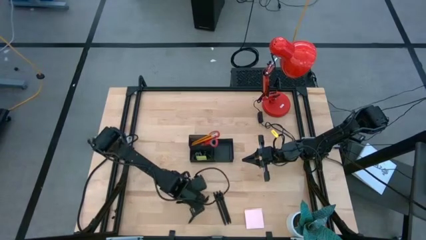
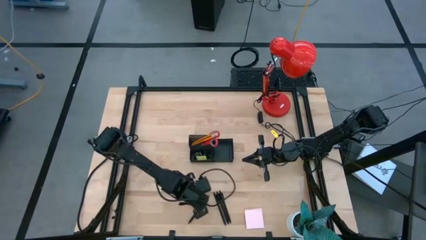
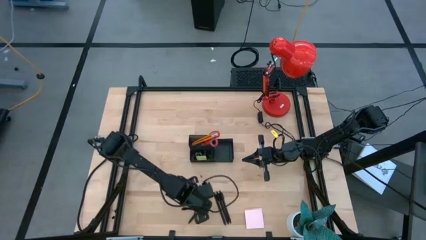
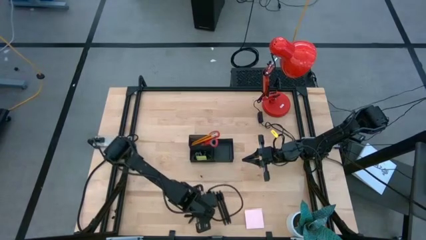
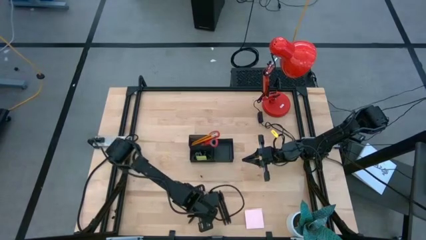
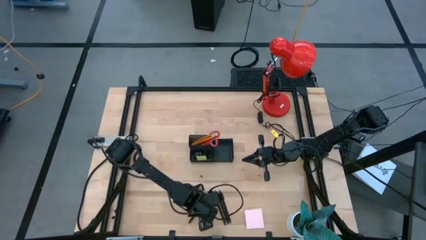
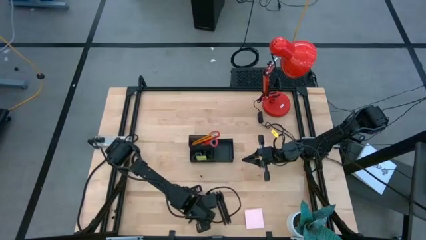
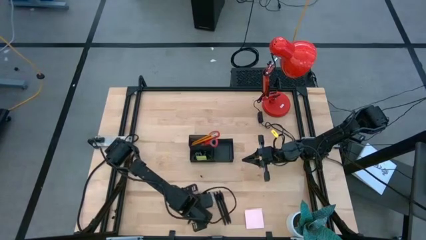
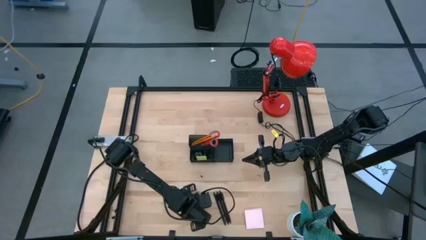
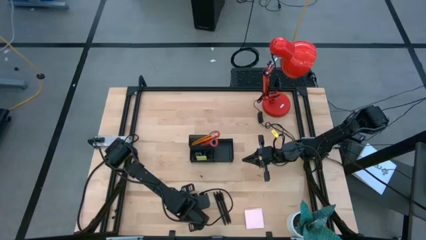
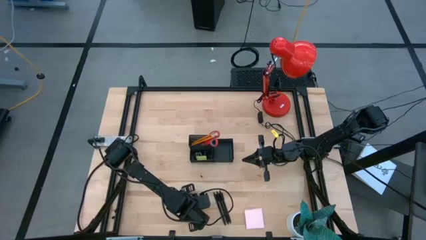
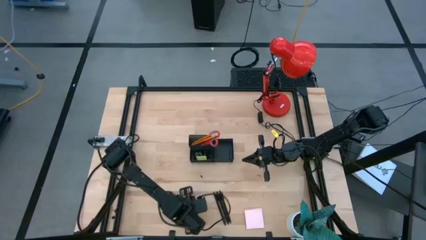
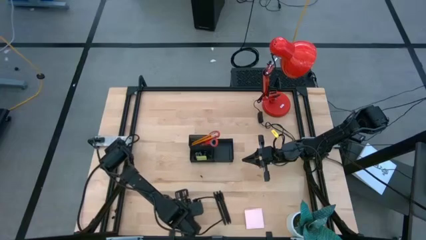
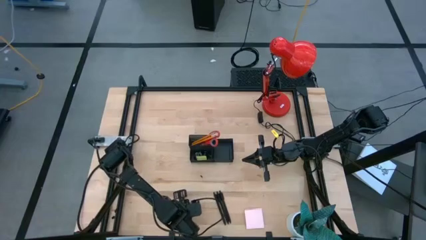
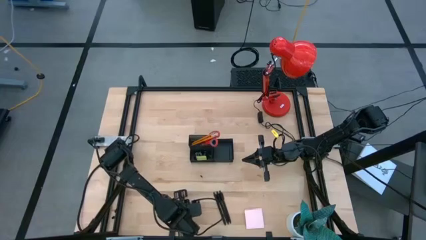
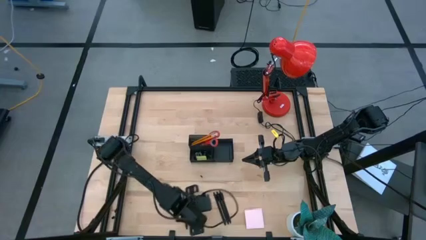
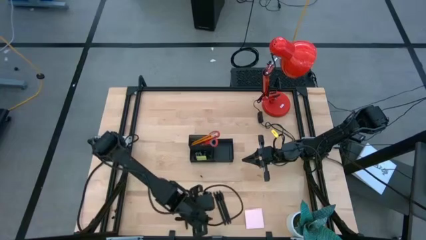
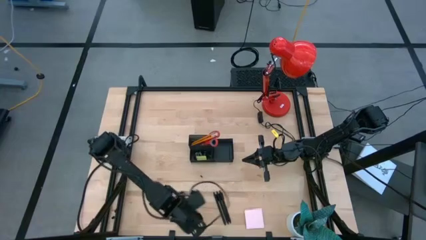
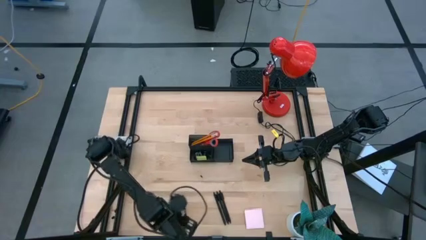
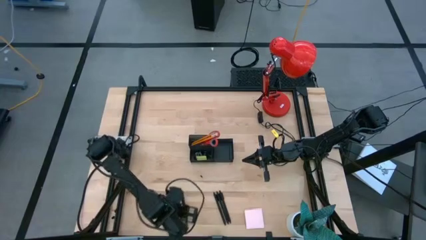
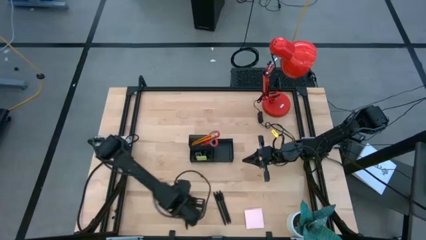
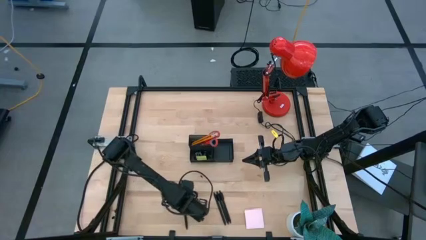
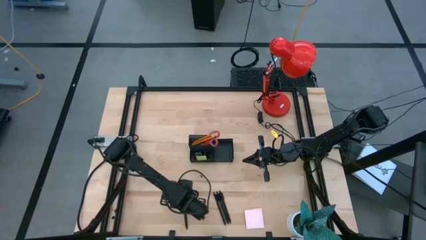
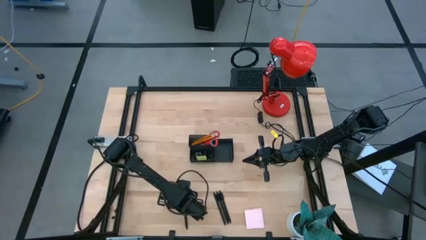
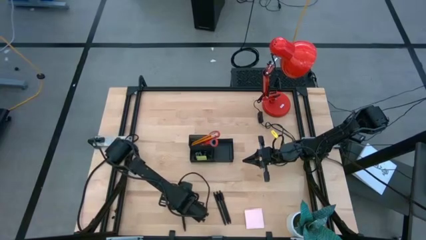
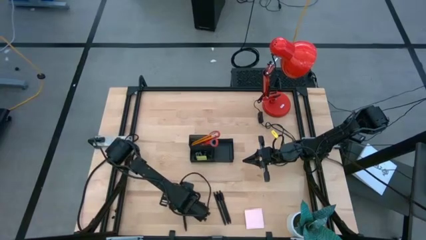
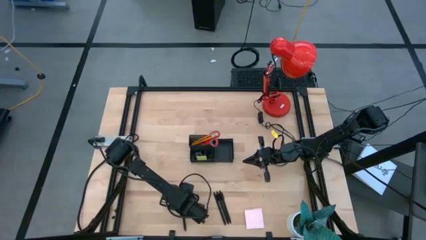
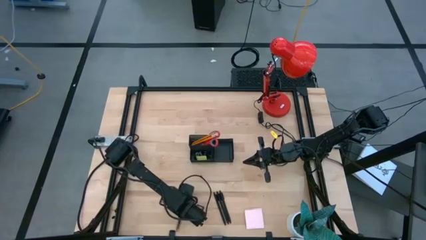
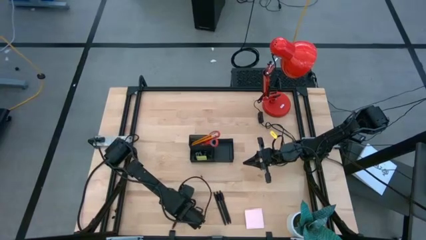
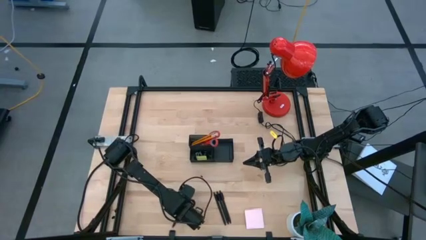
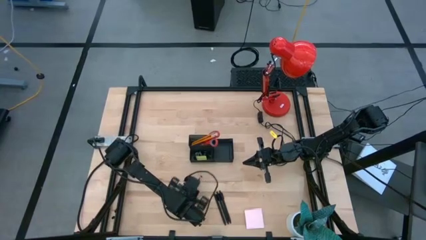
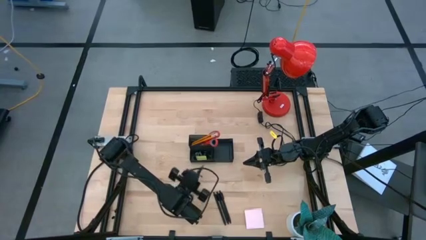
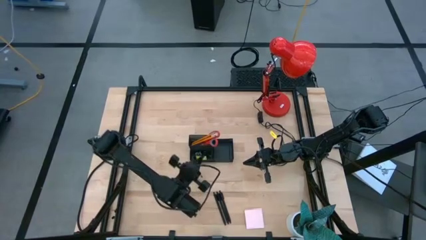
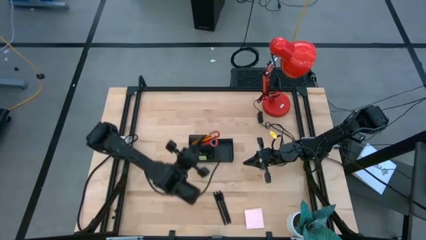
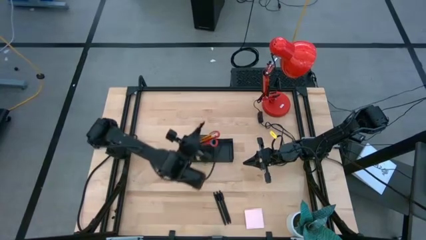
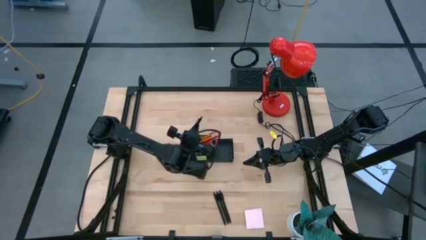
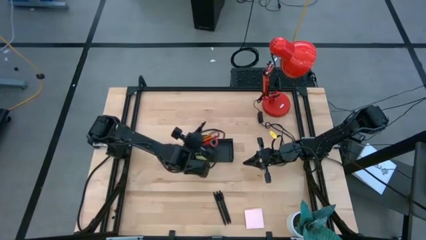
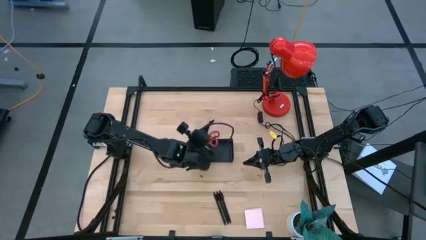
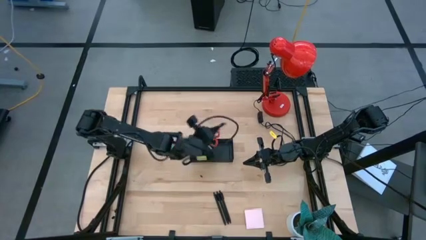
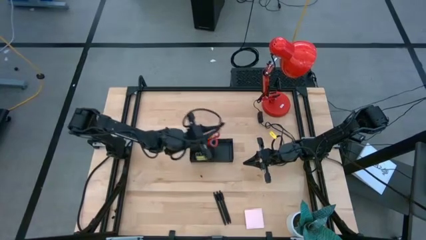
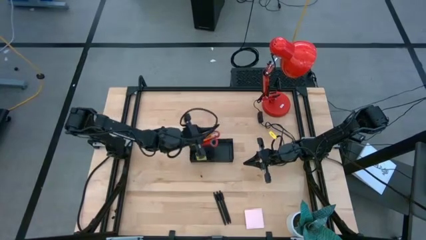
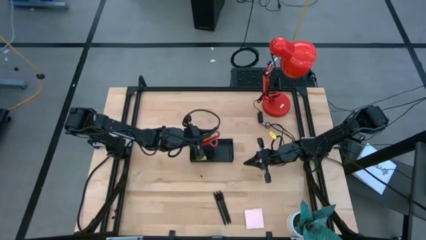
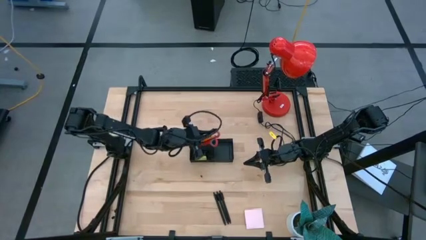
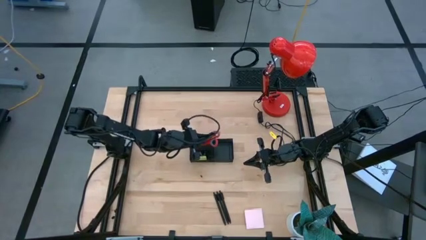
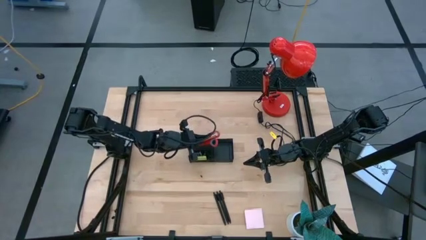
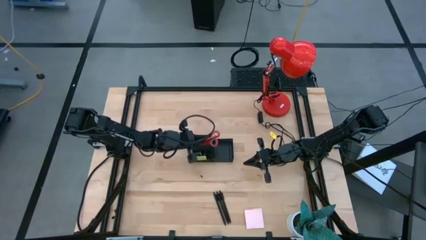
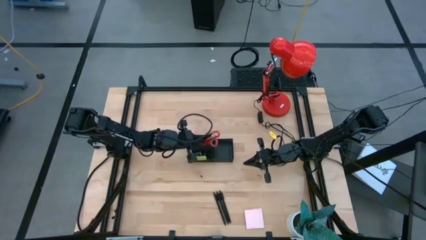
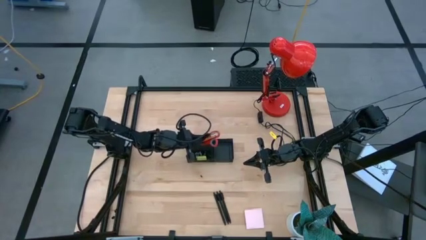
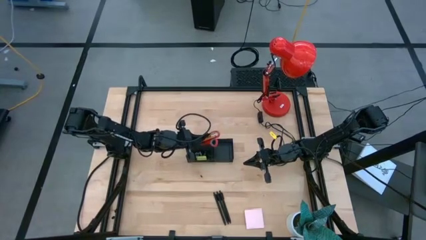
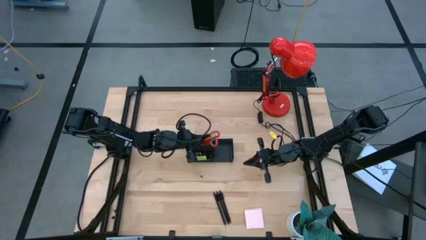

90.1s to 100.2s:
Task: Pick and place office supplies into organizer
Put the black pen into the black desk organizer

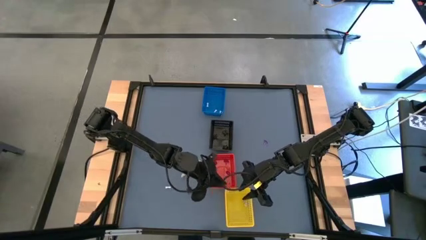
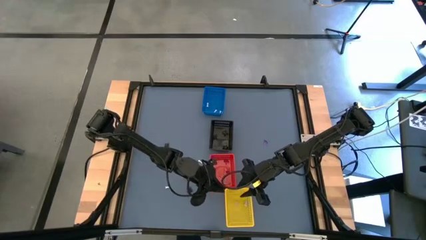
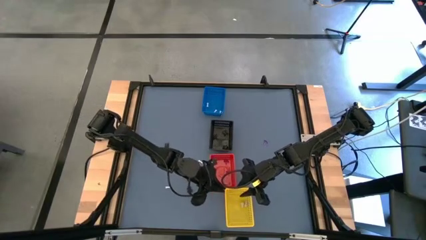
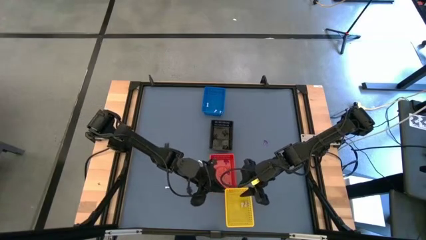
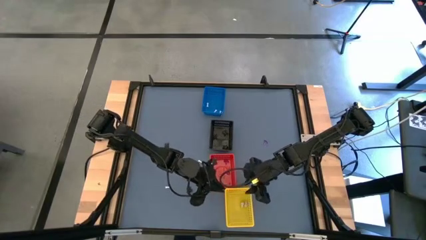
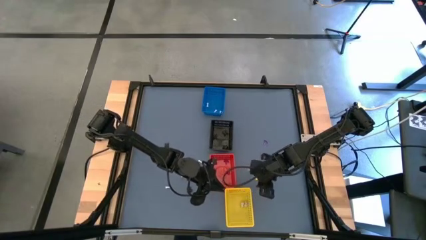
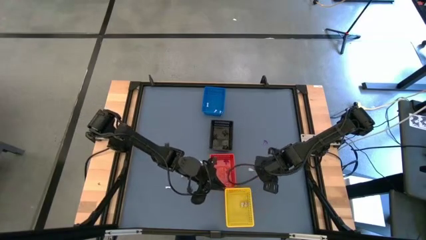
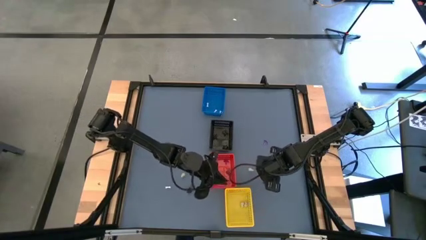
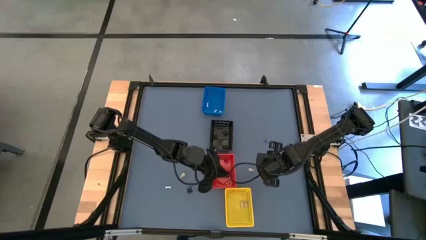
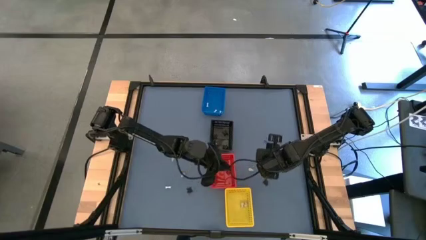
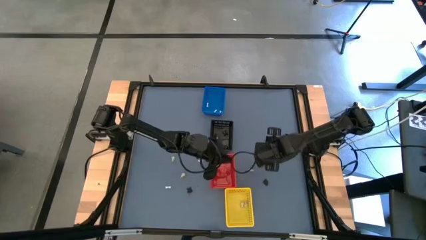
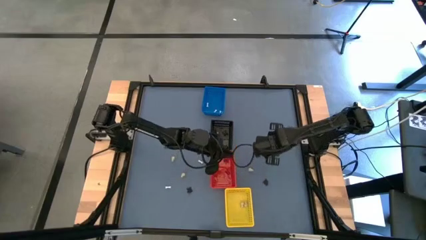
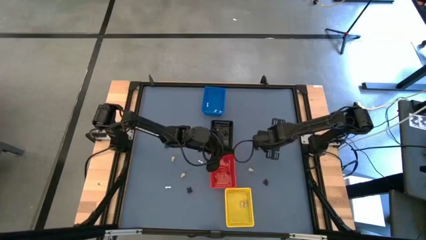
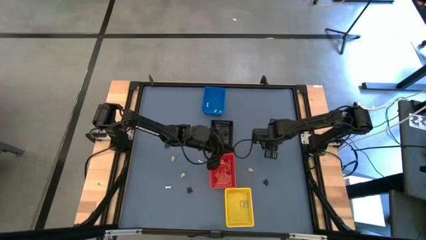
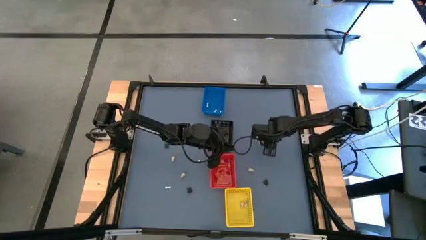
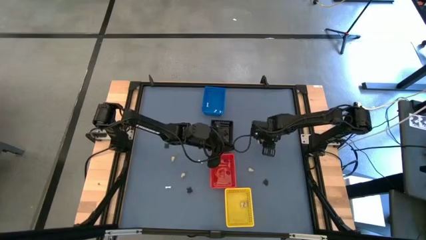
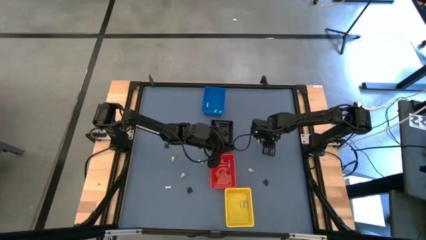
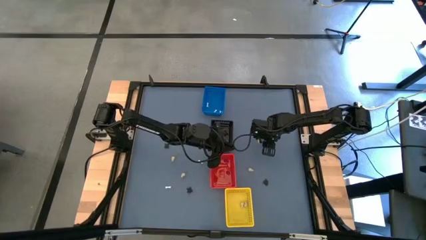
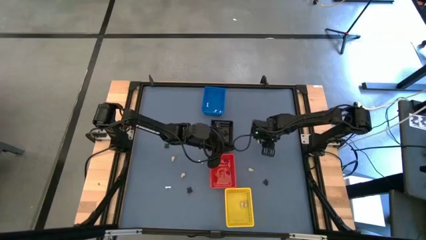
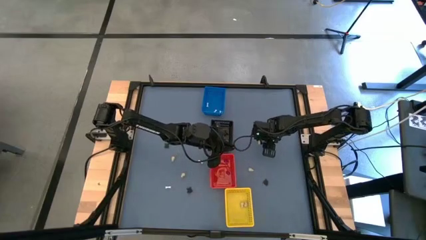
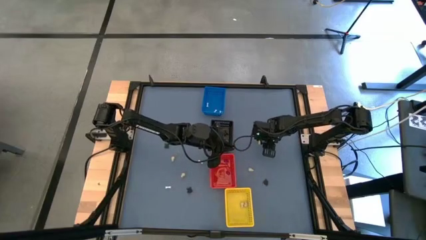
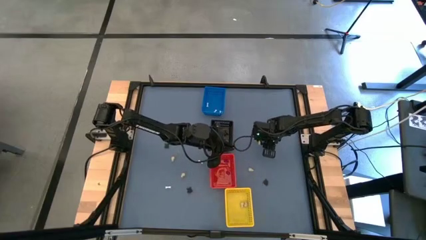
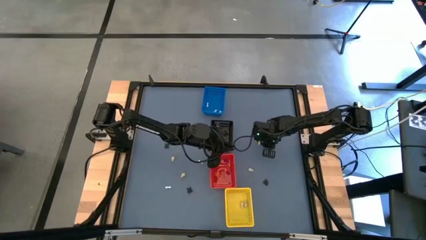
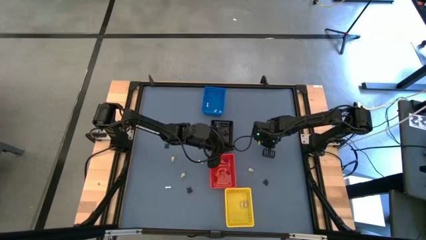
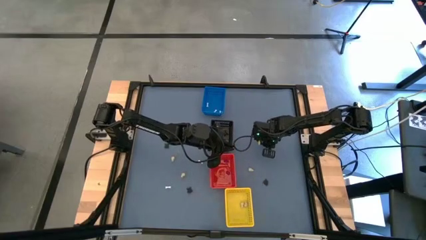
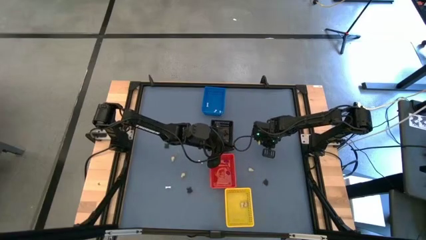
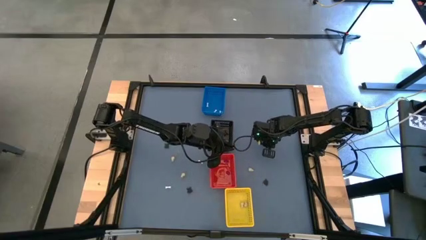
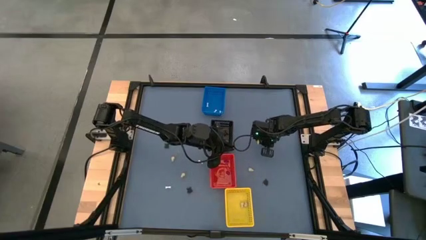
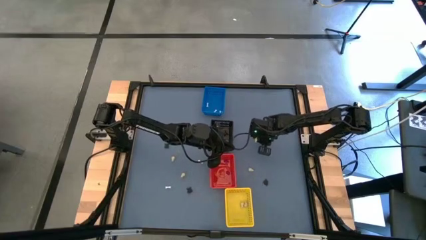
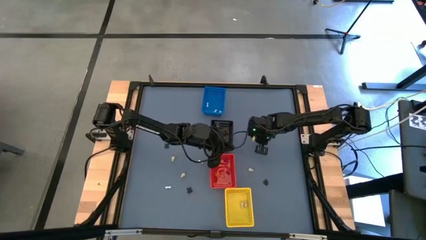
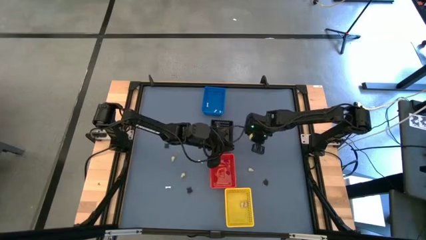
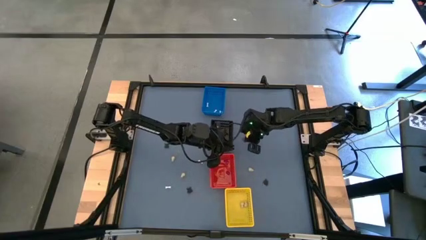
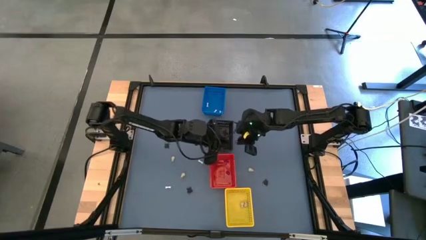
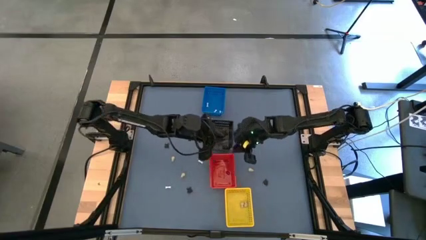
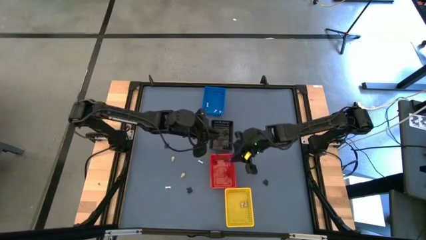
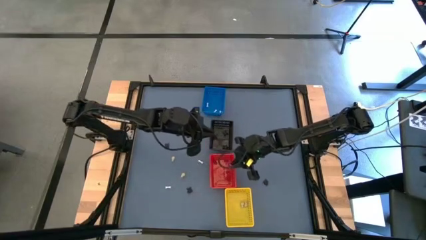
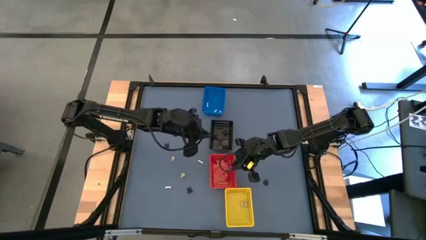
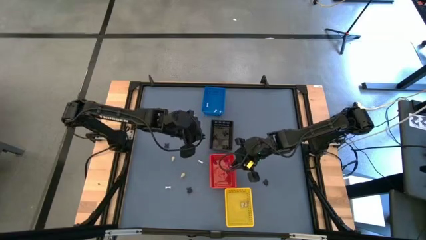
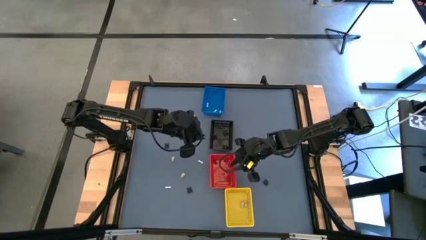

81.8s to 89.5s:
Task: Sort Halloween decoration
Put the violet witch hat toy into the red bin
